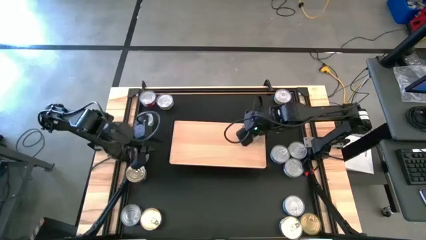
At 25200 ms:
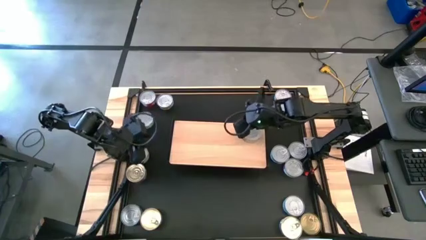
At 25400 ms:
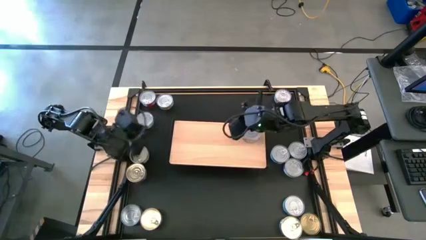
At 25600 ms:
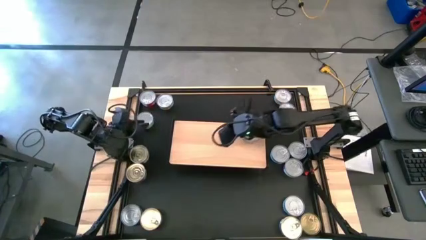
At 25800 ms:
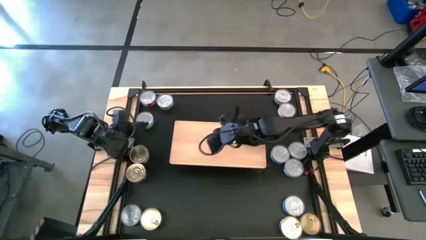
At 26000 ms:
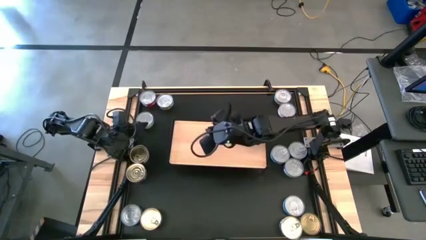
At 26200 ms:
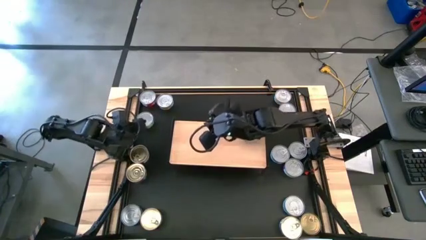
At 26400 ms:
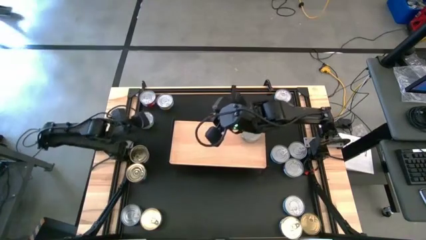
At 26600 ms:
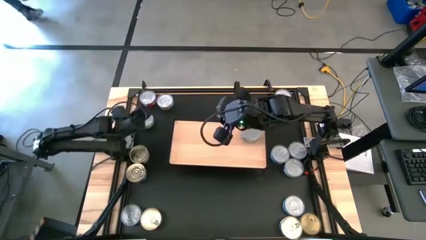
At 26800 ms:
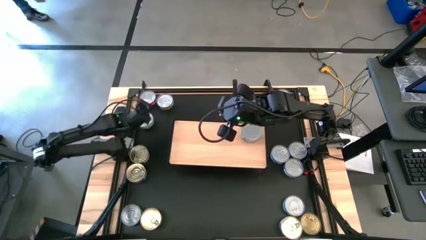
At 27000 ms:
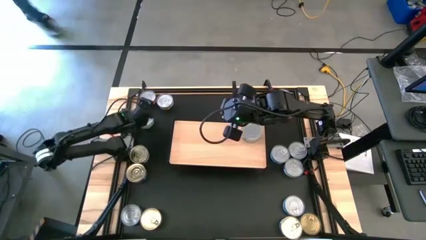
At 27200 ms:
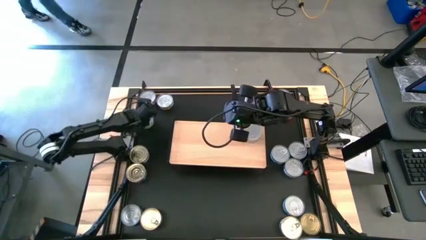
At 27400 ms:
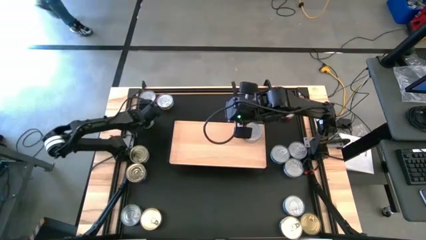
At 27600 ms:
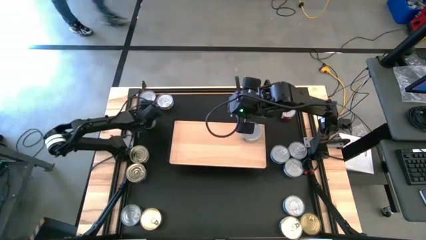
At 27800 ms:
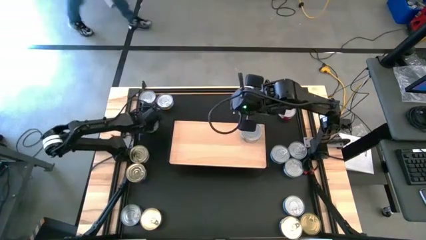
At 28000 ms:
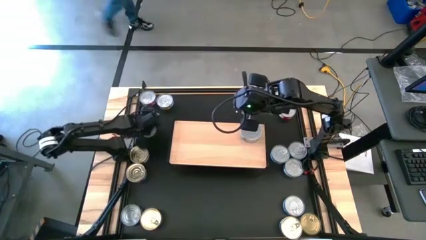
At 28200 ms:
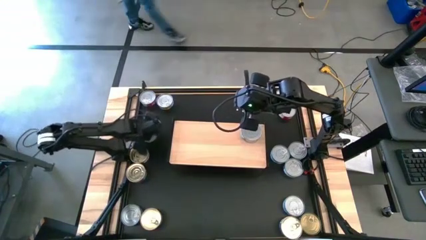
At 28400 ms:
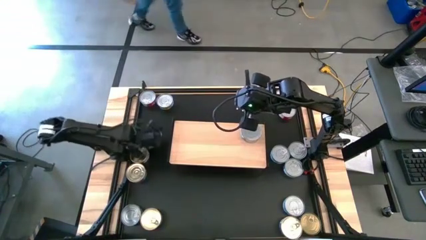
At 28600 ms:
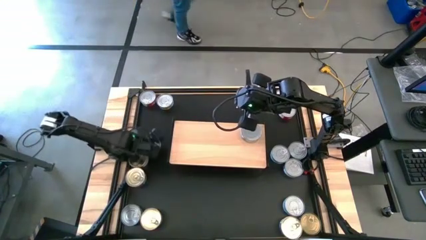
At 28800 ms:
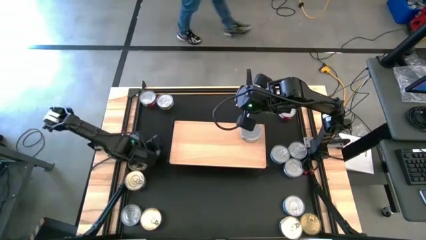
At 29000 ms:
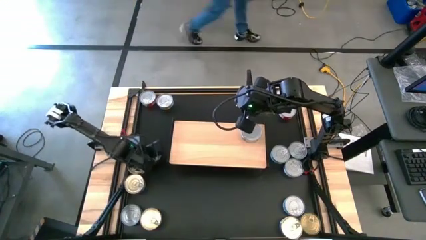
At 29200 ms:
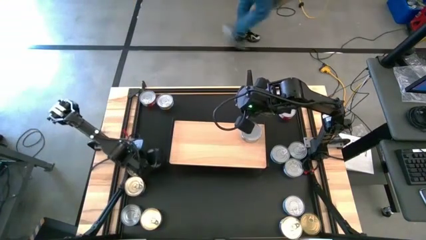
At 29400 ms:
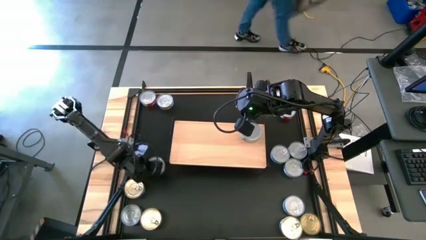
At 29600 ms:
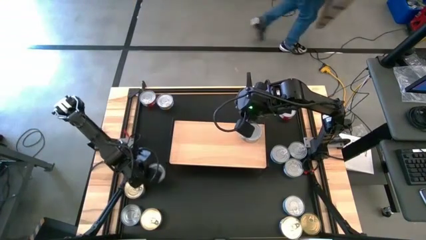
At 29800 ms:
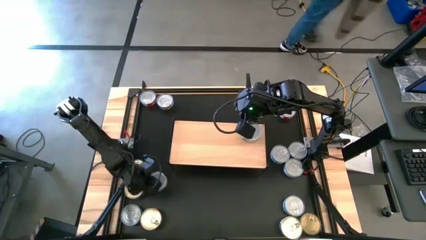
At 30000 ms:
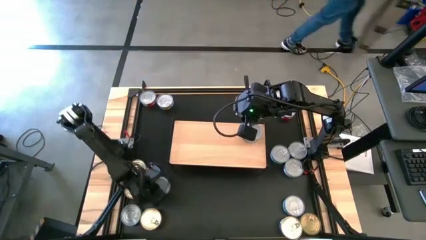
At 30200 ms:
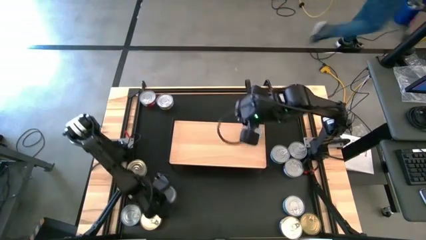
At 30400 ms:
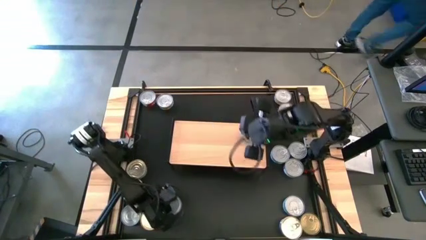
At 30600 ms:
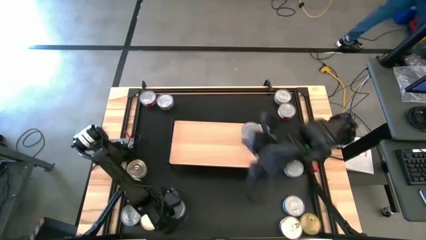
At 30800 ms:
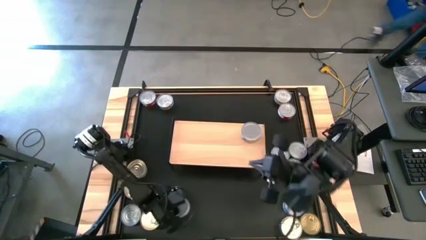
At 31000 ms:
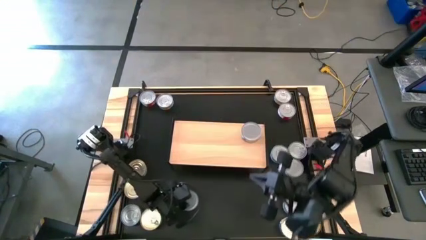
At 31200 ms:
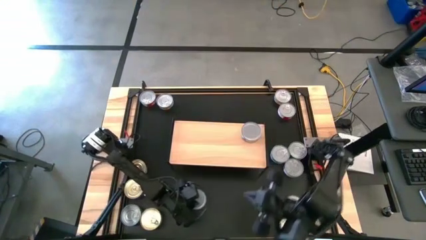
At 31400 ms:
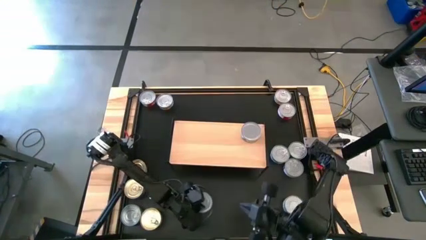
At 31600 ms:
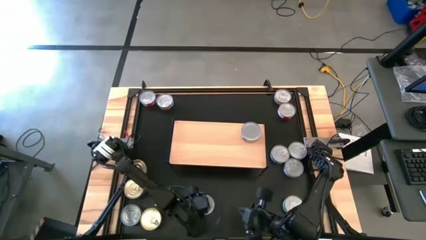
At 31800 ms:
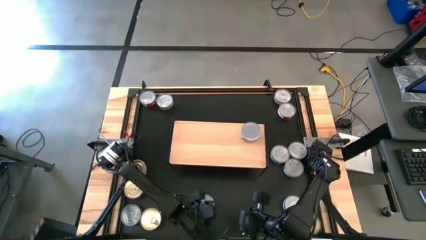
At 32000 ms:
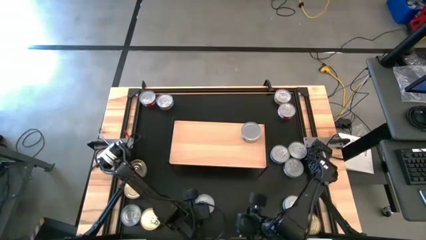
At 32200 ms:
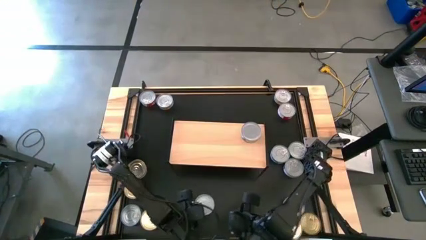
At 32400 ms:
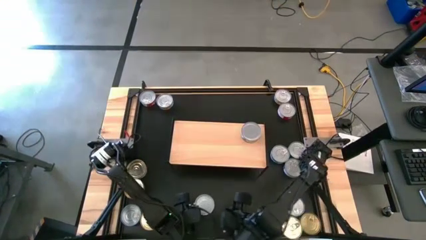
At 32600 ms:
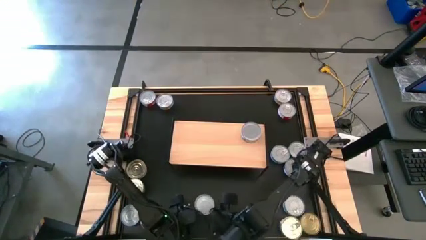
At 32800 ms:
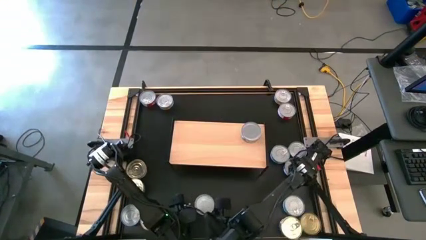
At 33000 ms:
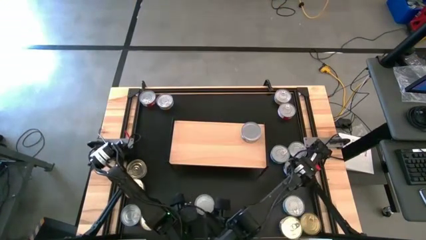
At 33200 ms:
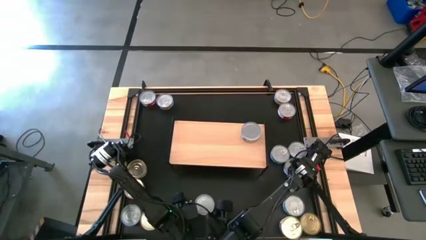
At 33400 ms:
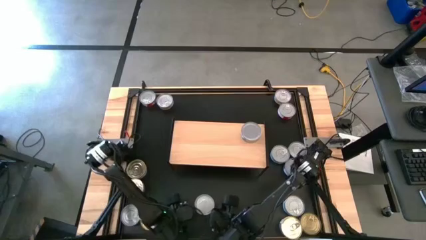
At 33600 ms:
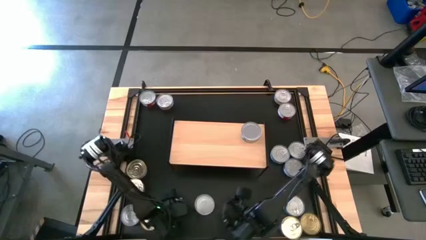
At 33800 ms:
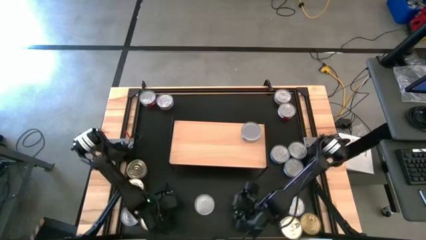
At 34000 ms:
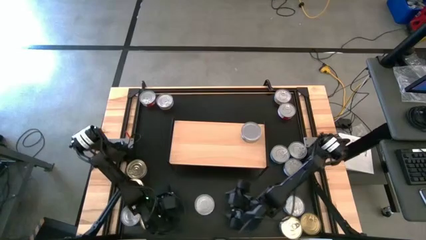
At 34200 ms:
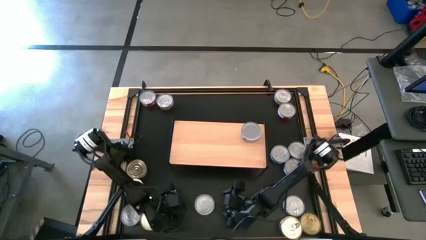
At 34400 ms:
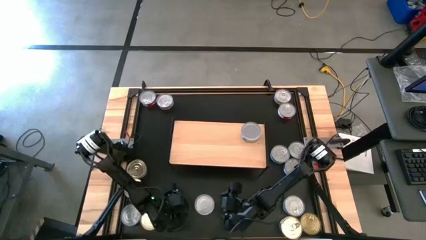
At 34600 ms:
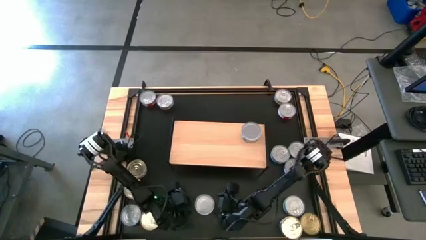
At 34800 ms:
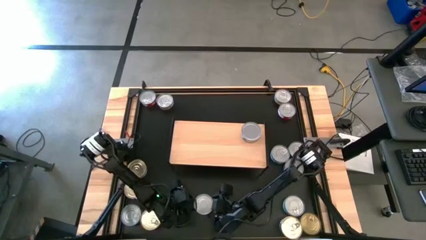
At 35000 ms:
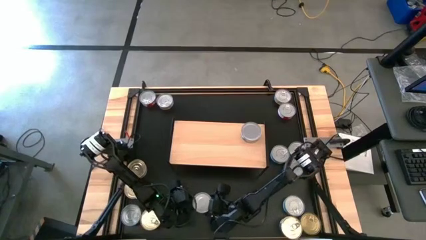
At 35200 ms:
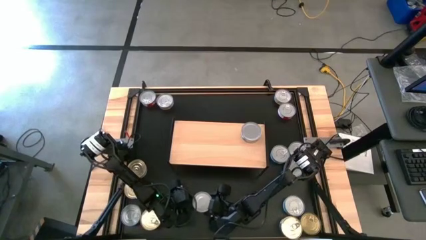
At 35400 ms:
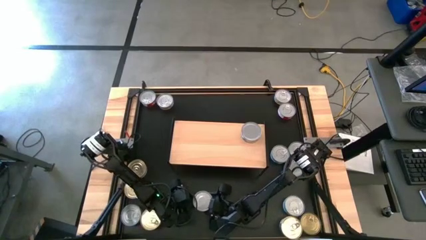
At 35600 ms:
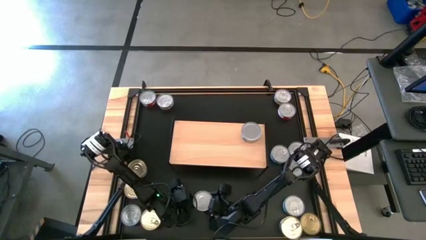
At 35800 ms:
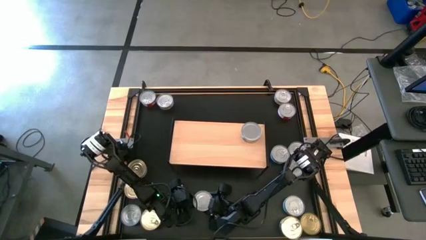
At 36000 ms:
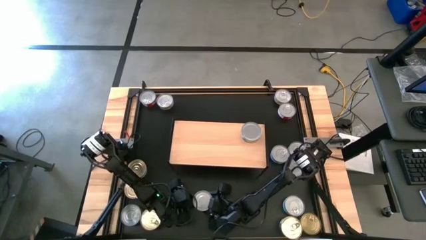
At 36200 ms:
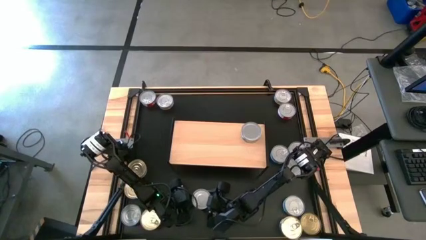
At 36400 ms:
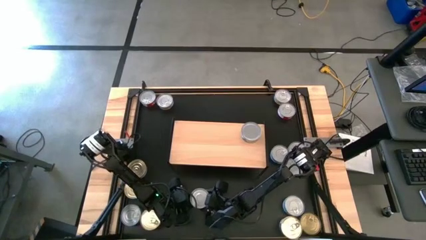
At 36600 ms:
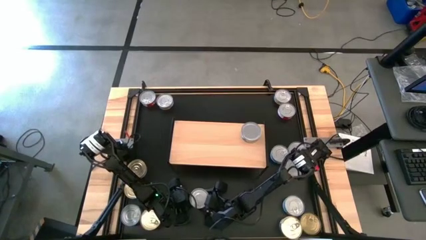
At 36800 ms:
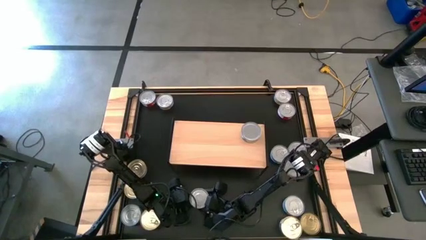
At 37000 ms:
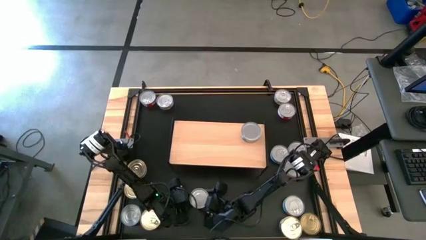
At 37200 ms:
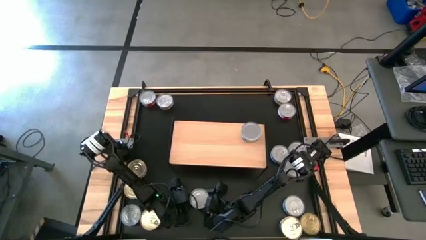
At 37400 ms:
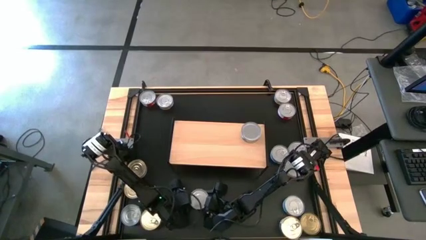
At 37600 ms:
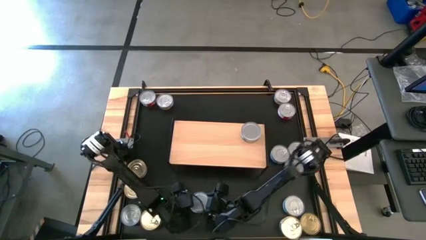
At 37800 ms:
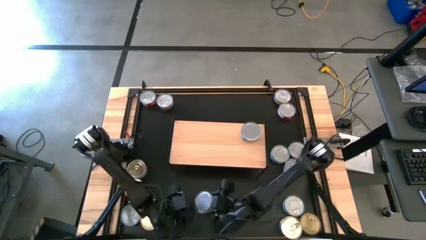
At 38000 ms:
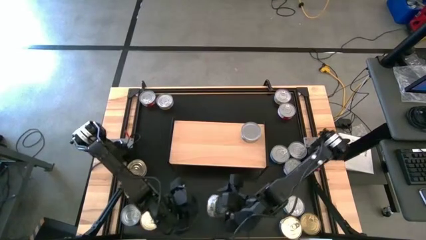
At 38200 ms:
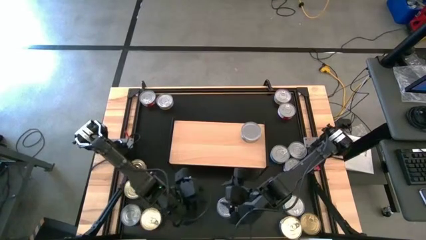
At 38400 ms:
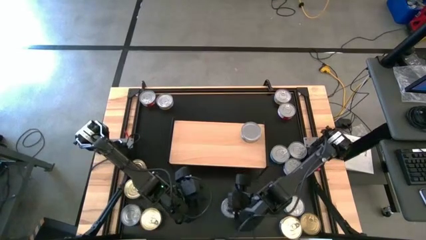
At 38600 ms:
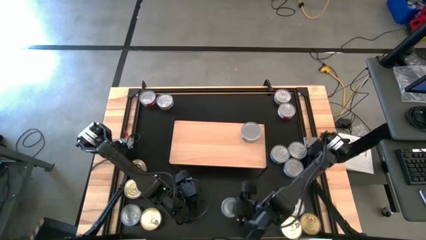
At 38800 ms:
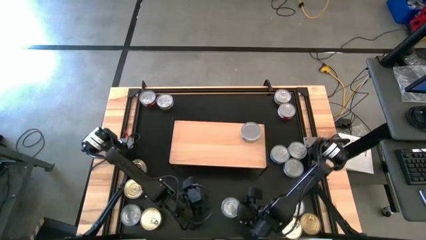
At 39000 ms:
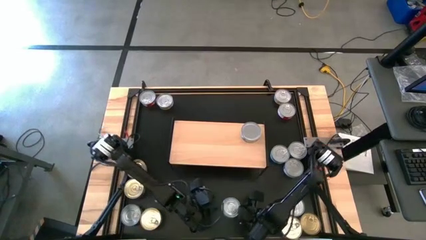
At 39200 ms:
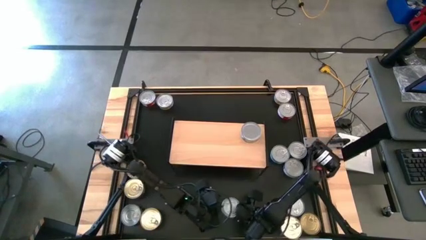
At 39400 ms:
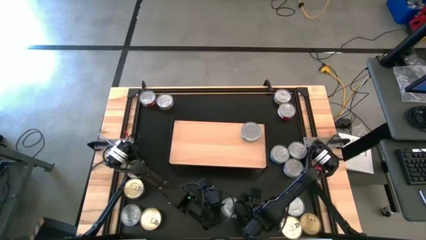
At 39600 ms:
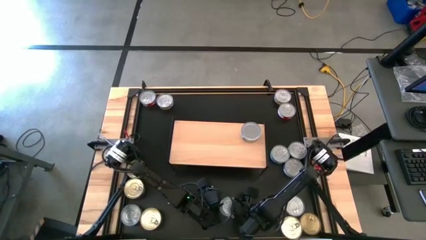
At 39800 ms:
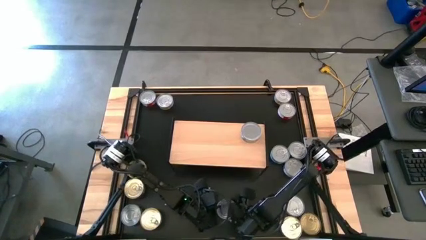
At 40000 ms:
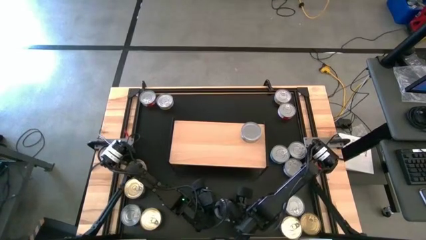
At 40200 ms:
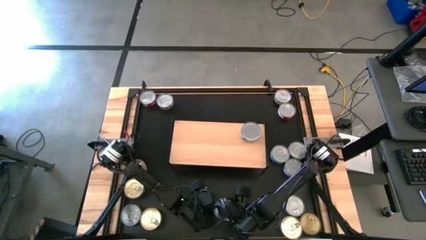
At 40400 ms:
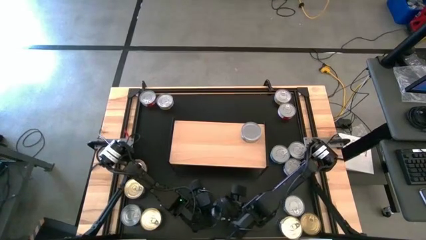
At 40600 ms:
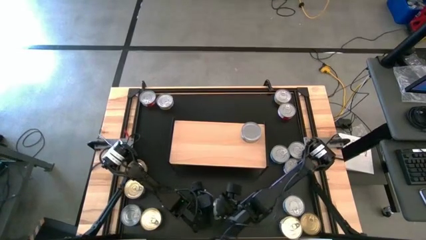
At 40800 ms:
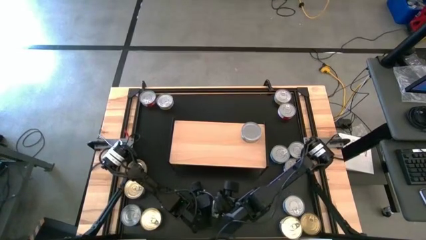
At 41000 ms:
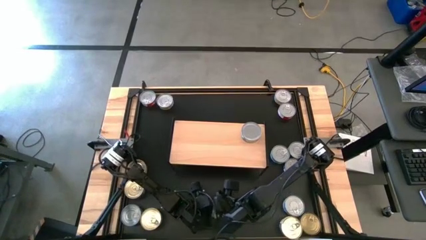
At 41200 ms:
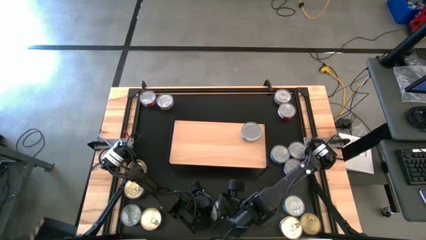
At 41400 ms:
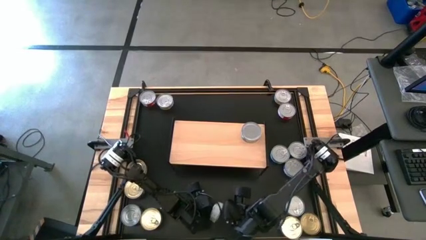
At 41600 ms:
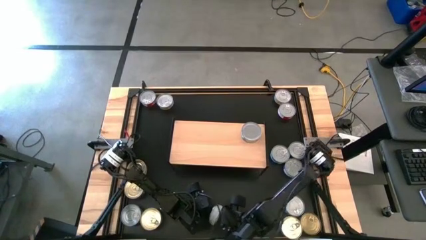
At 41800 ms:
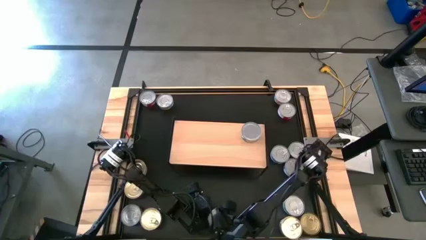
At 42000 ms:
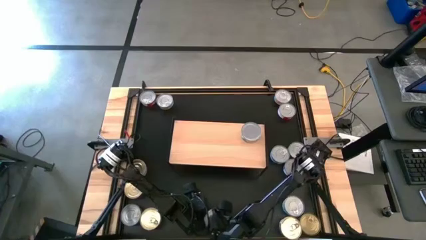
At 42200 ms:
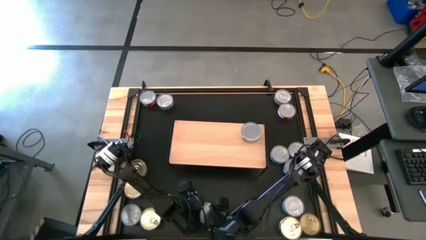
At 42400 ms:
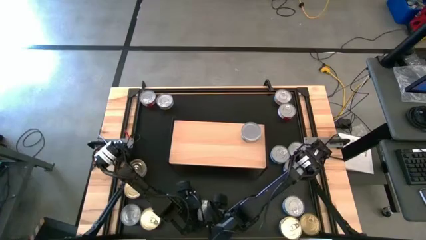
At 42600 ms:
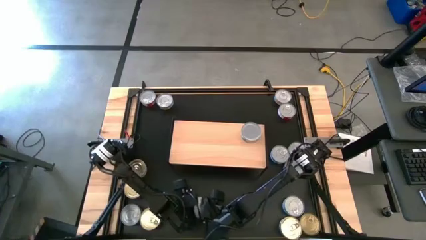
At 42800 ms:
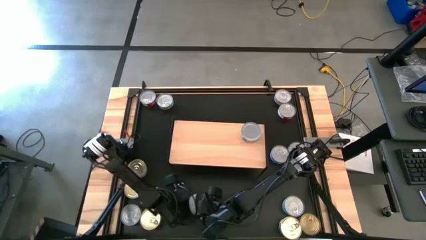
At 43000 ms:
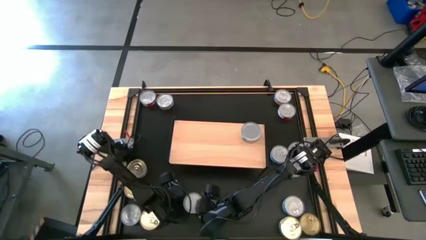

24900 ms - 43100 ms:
Task: Stack canned seafood by type on shelf
Stack the green white tuna can on top of the green white tuna can on the shelf
